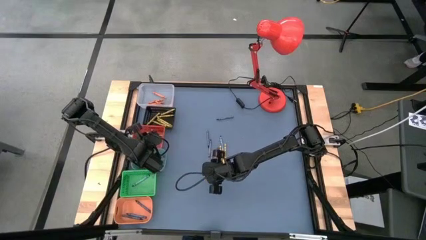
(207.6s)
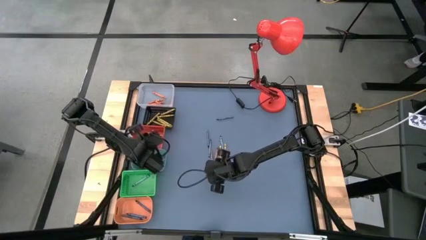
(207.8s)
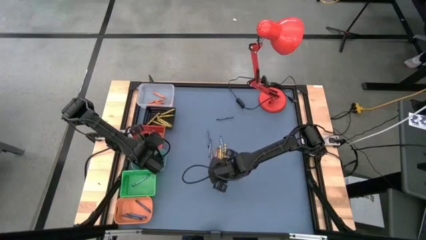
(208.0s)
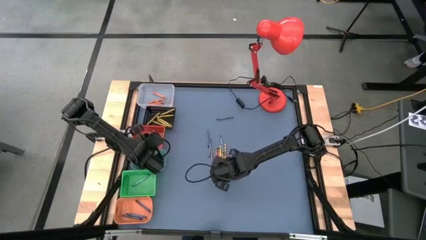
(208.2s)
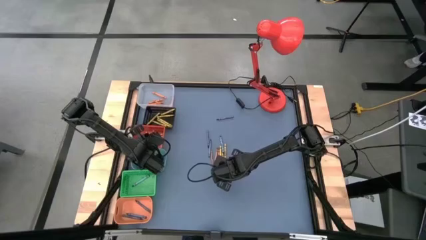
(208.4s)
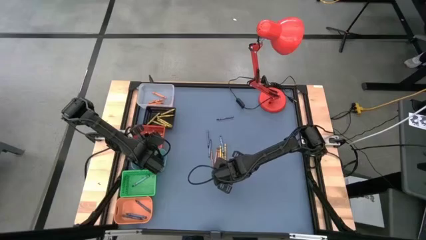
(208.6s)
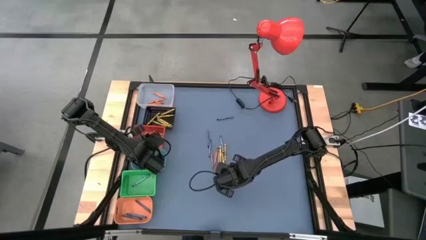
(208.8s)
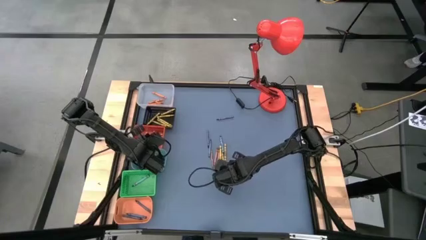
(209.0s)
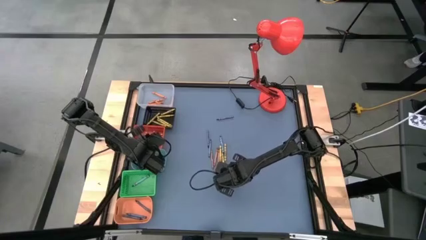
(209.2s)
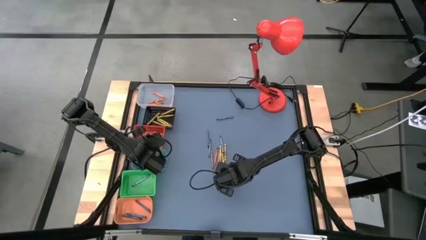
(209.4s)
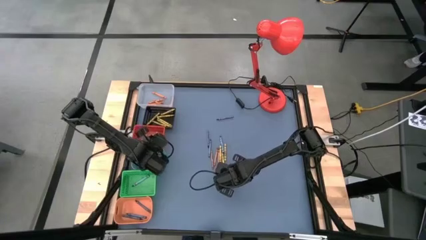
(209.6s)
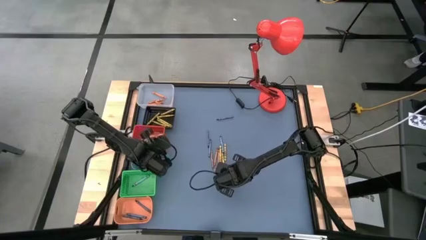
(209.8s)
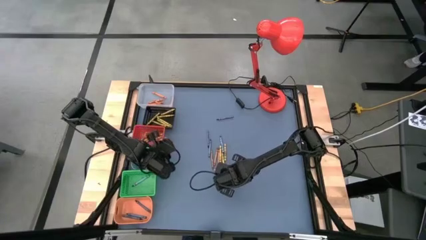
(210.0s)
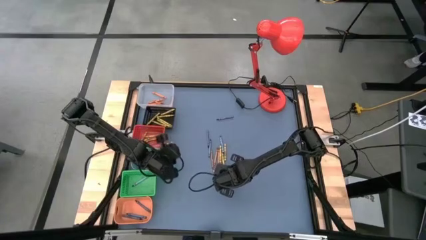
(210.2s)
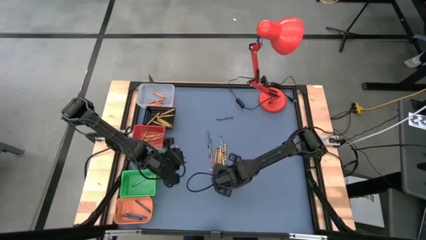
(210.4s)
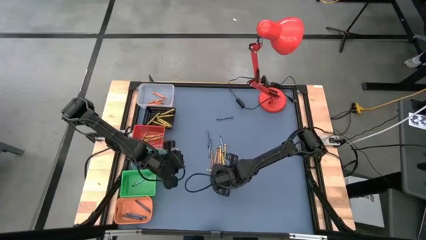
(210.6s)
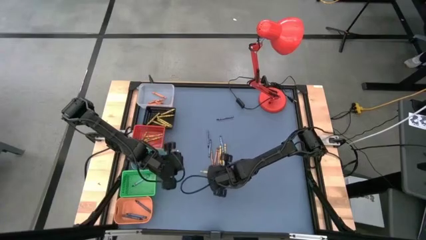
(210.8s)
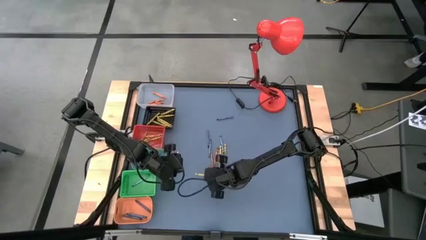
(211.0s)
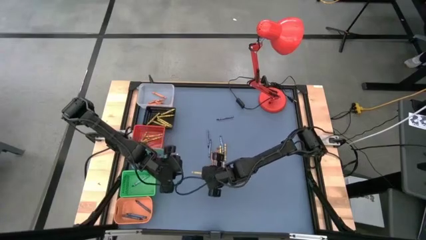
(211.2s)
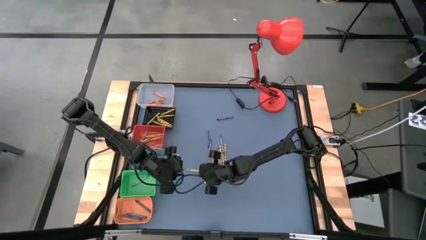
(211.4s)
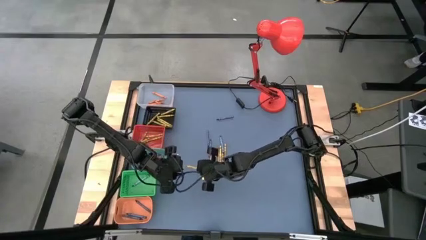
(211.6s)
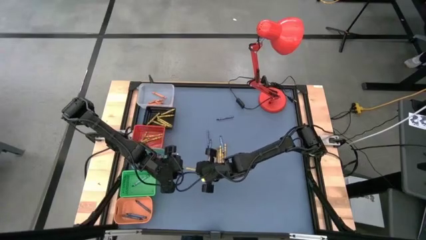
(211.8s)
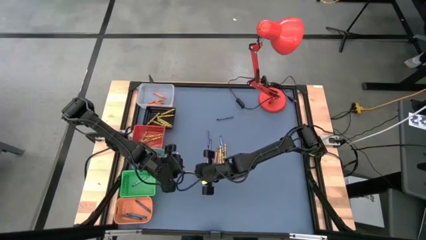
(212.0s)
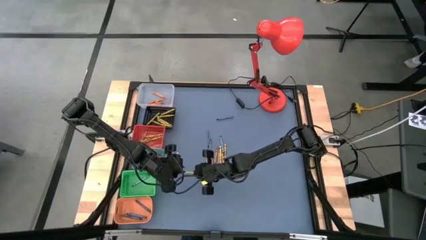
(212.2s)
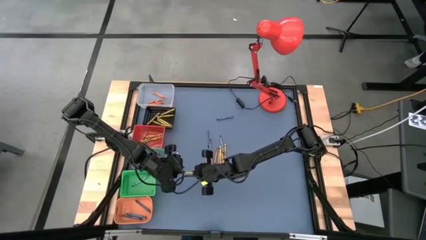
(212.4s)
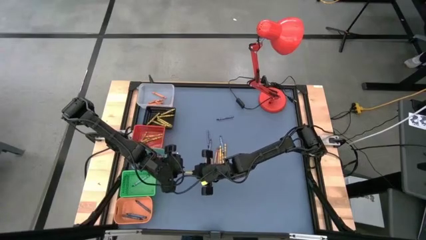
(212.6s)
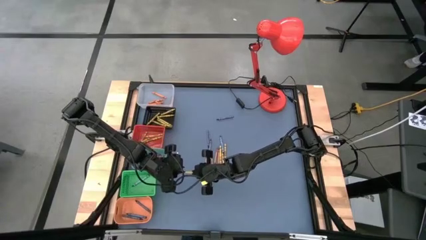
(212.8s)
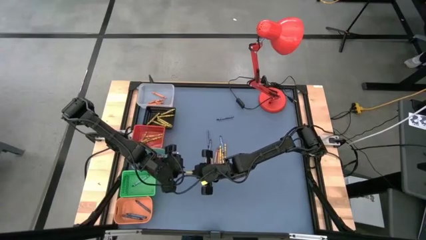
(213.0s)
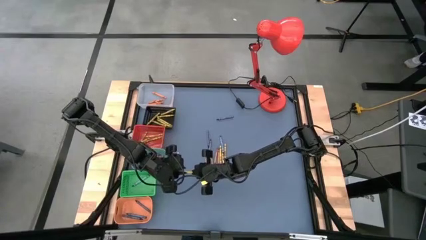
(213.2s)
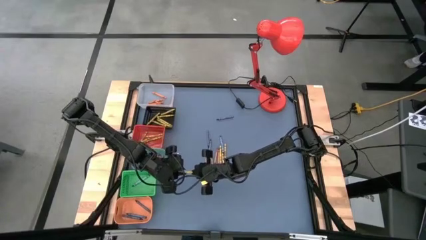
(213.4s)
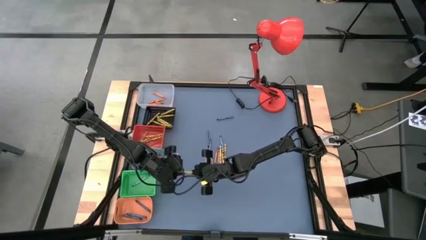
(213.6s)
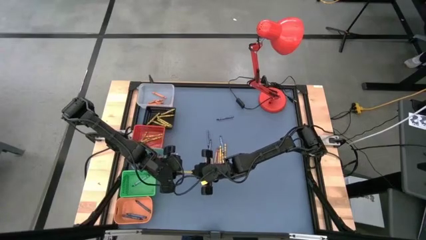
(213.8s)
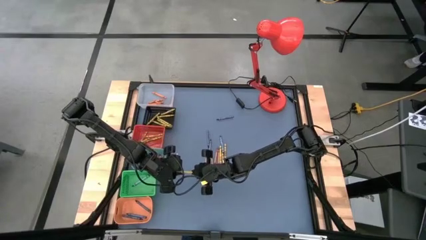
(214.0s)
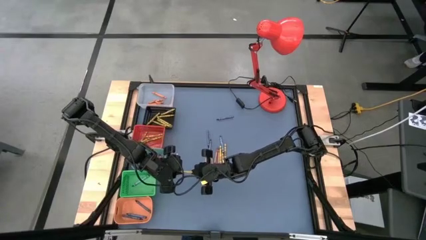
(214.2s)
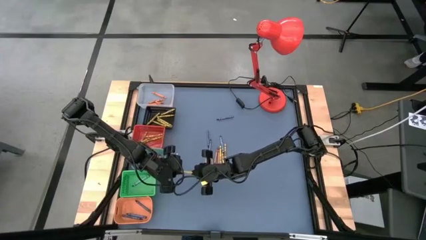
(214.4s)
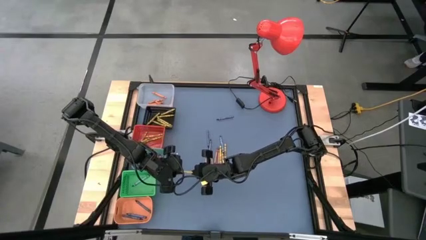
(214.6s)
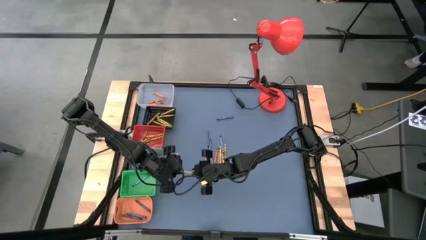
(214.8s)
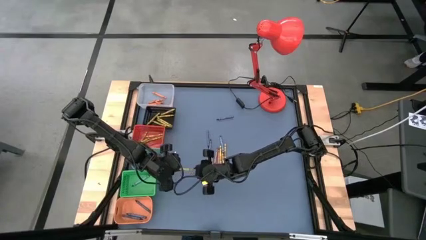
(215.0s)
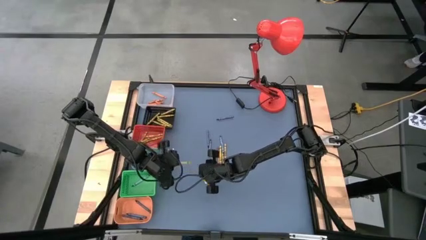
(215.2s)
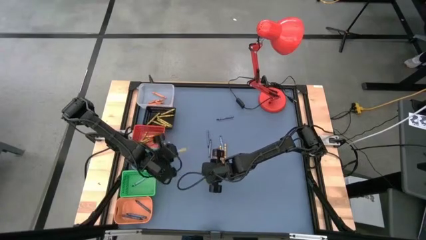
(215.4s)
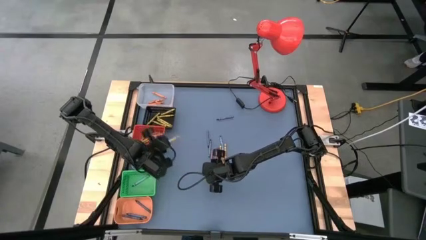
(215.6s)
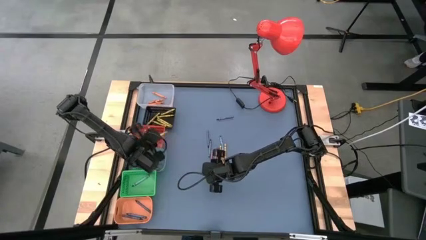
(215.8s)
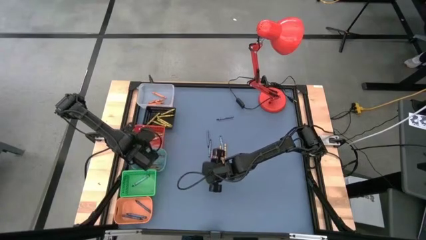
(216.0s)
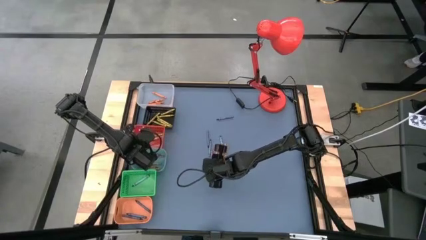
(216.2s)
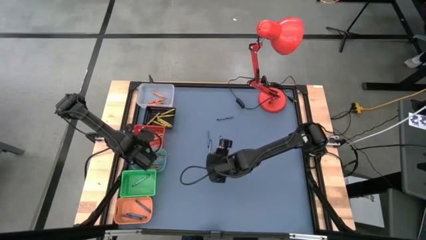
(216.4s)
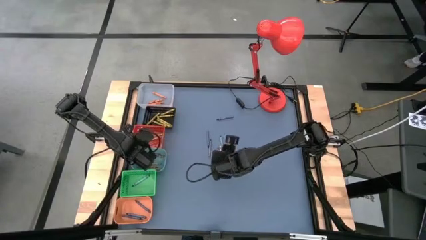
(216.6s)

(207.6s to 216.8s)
Task: Sort crayons
Put the yellow crayon into the orange bin

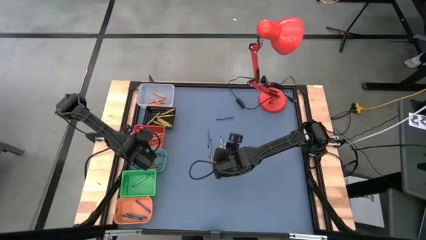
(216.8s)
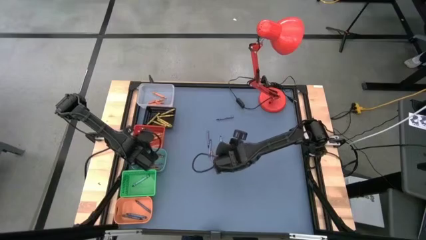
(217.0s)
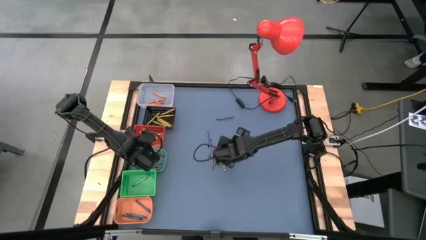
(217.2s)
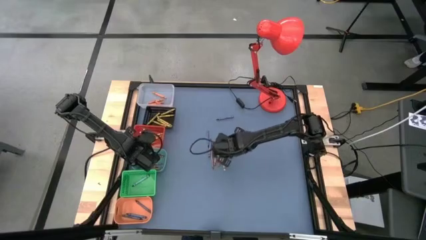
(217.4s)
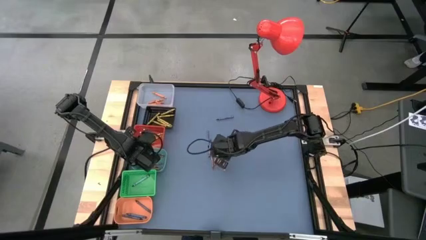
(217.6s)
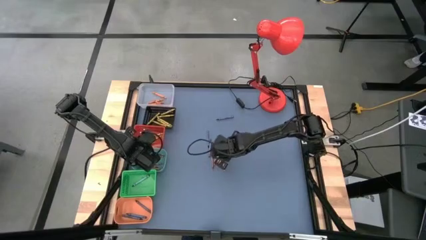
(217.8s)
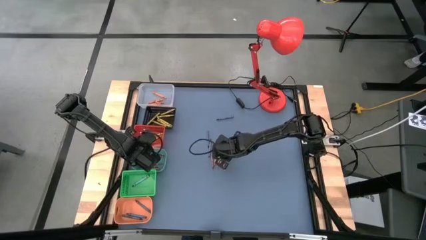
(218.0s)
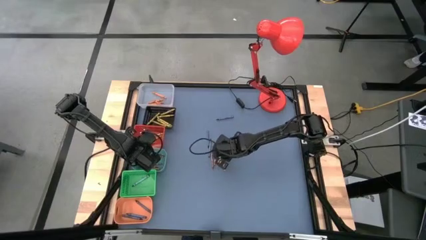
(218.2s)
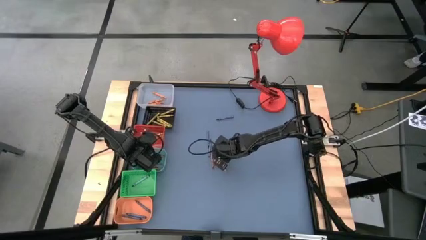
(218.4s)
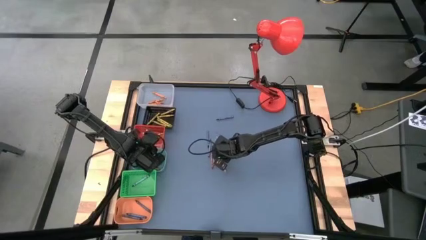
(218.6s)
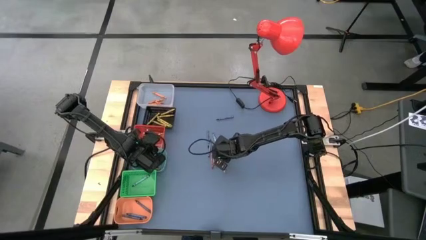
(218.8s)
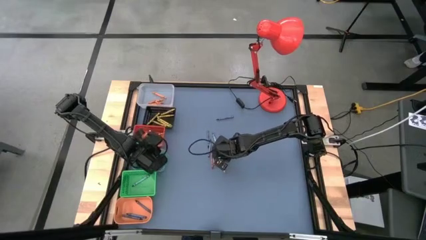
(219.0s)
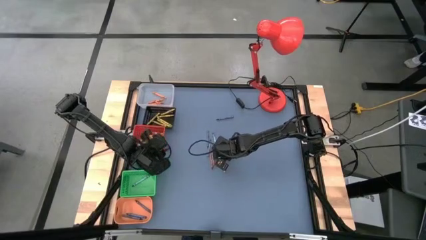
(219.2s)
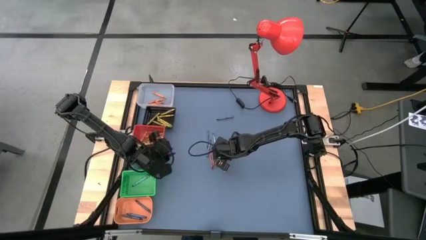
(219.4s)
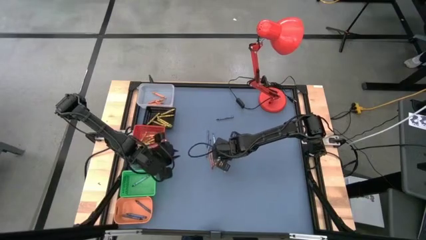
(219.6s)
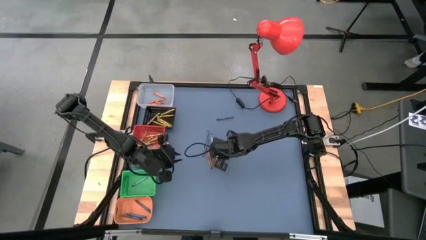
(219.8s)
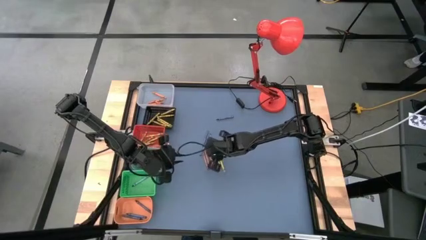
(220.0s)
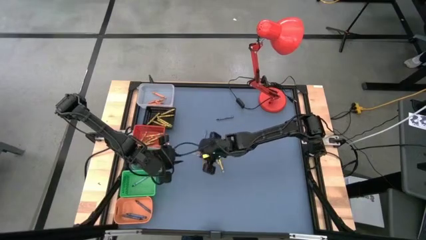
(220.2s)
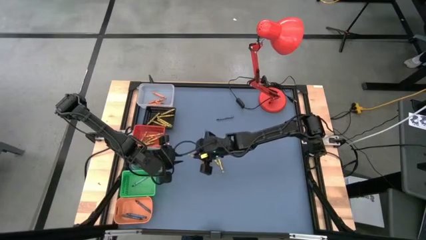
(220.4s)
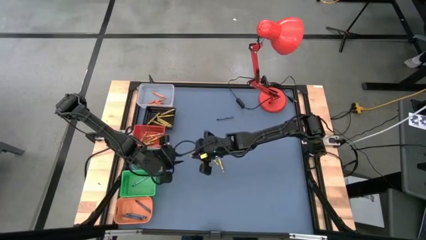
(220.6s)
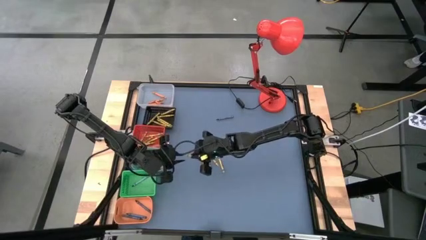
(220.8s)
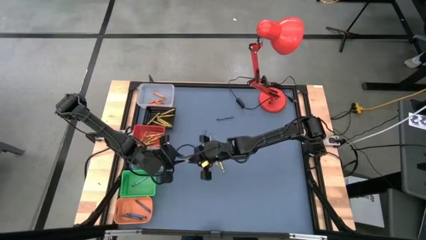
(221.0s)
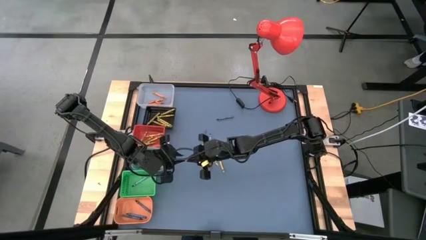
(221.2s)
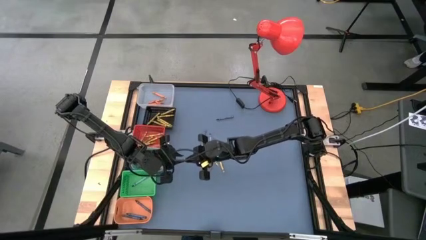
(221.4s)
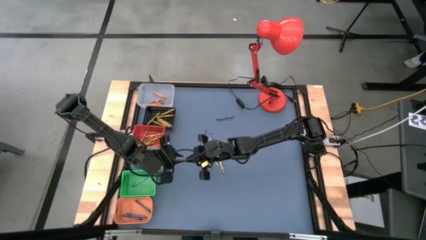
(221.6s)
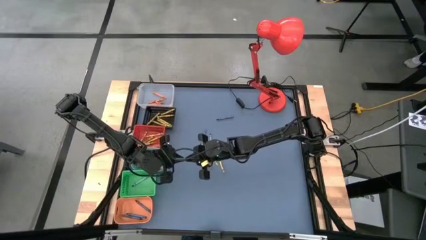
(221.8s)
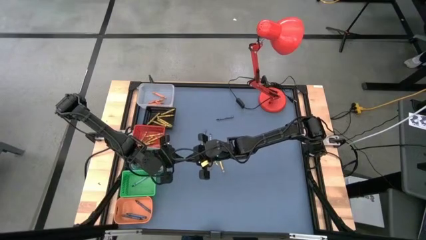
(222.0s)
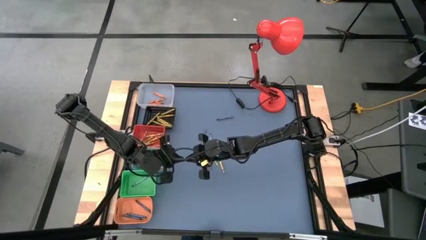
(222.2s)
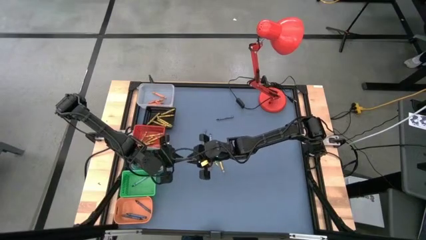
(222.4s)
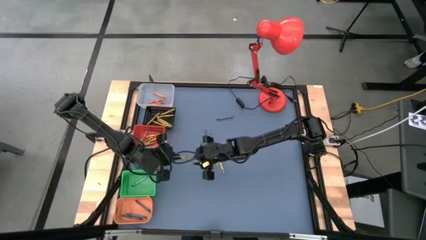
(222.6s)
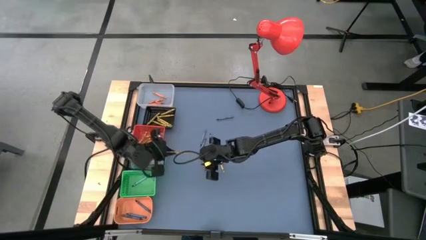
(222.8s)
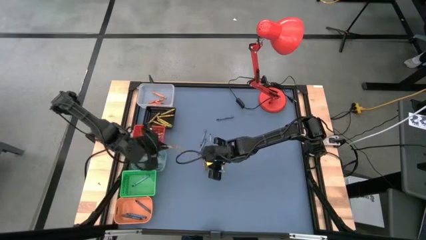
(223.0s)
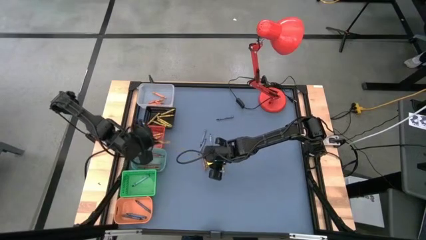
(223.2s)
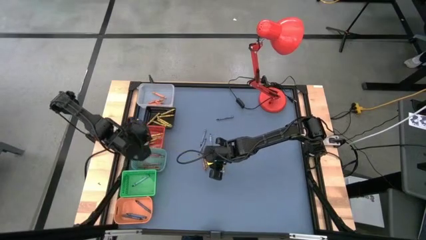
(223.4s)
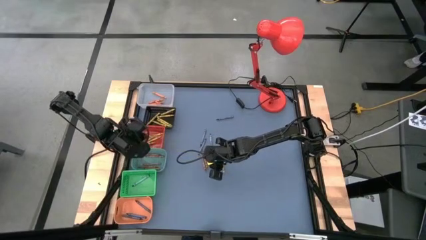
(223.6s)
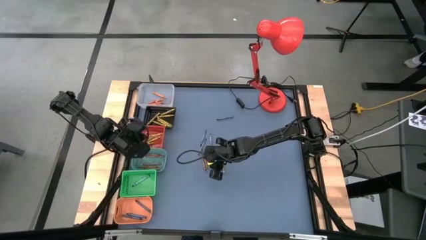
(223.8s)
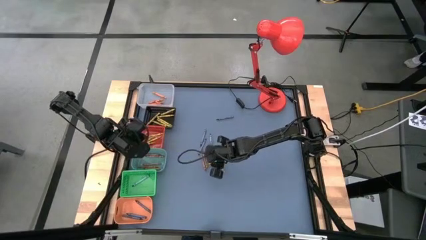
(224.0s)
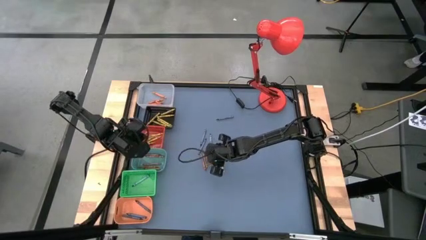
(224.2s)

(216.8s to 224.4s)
Put the yellow crayon into the orange bin
